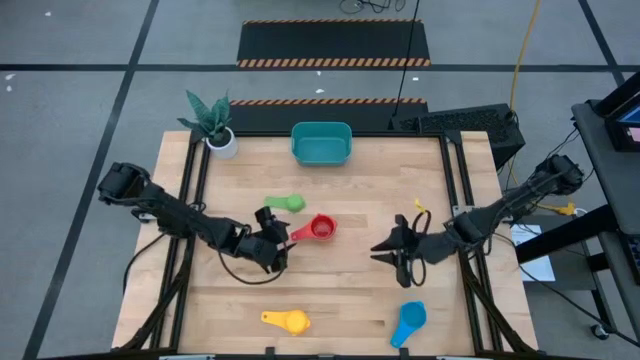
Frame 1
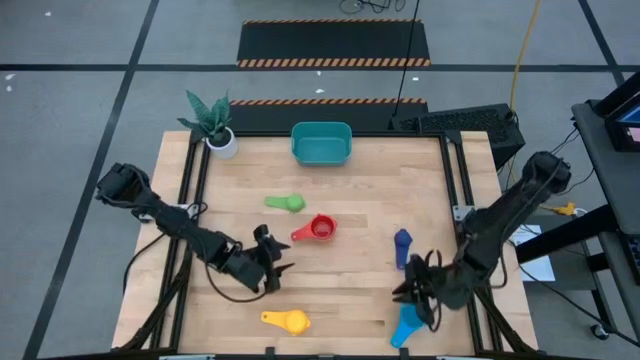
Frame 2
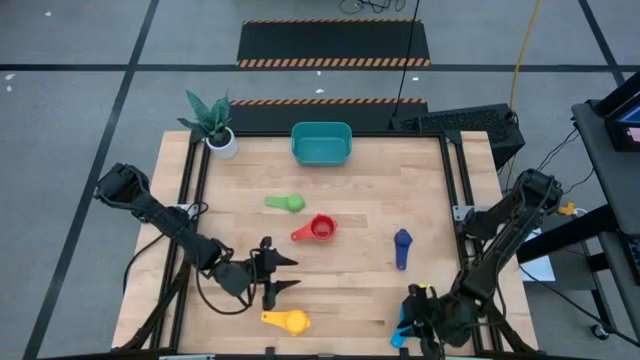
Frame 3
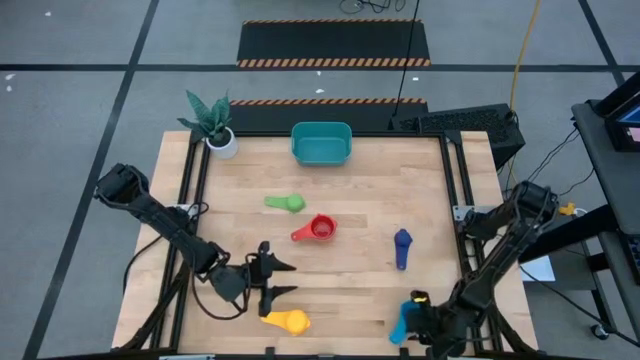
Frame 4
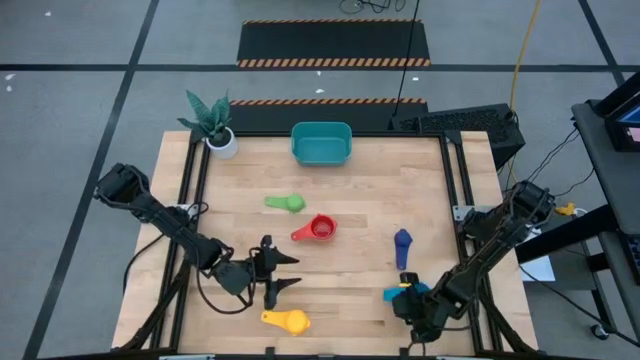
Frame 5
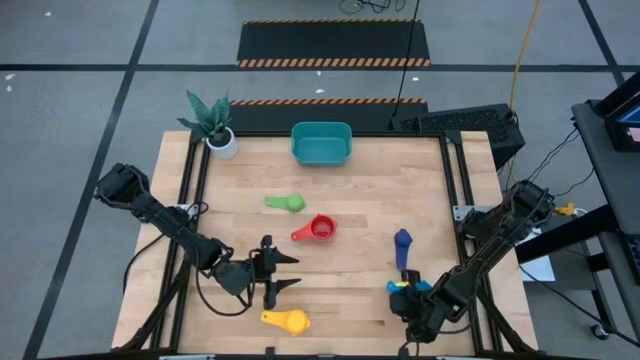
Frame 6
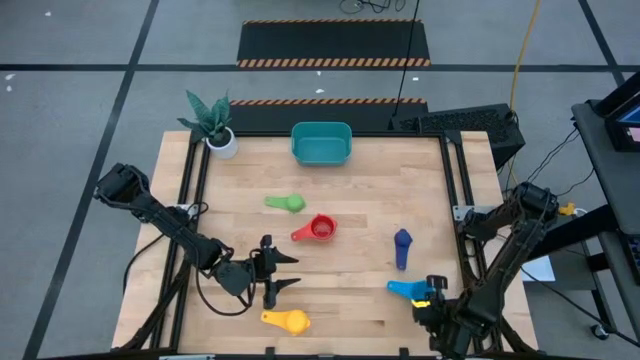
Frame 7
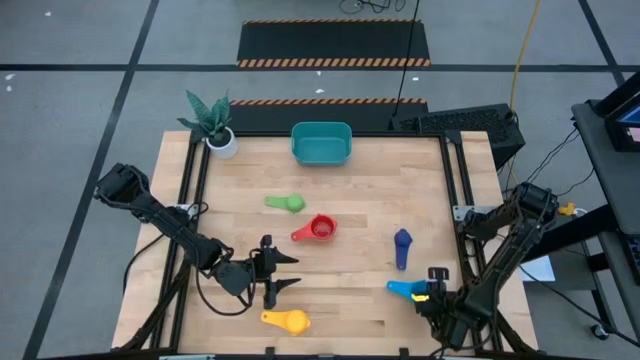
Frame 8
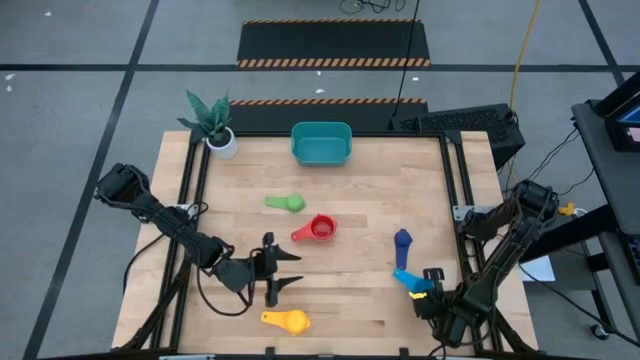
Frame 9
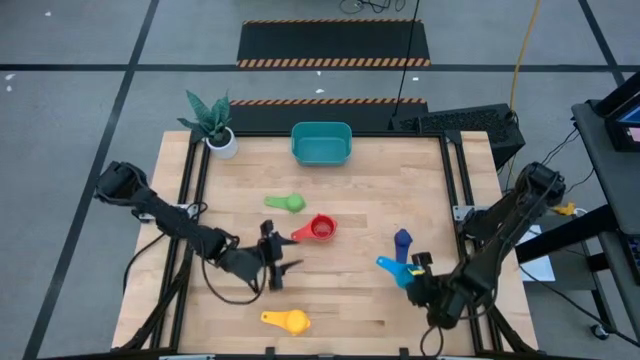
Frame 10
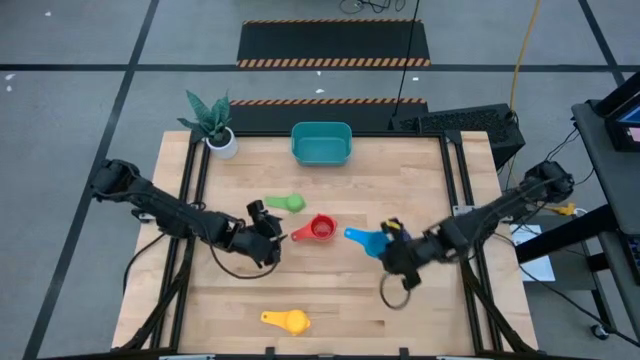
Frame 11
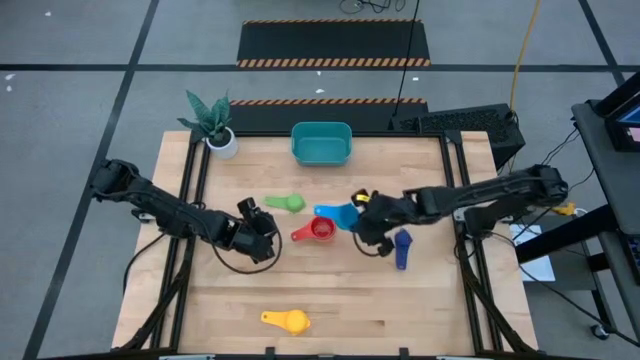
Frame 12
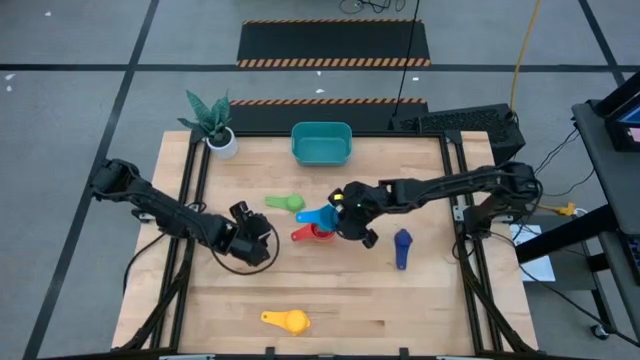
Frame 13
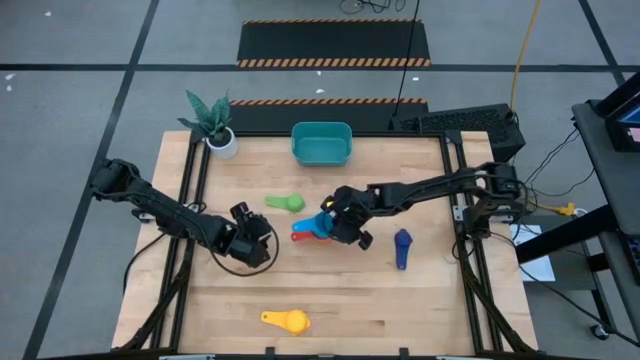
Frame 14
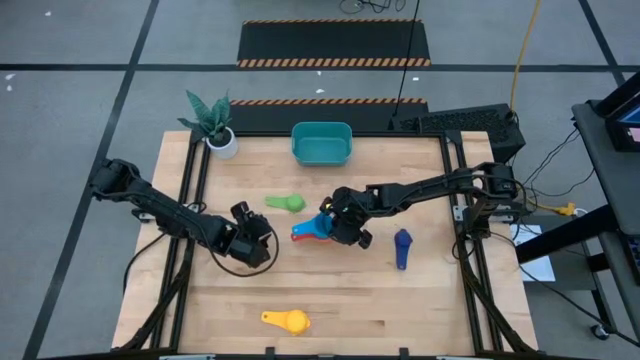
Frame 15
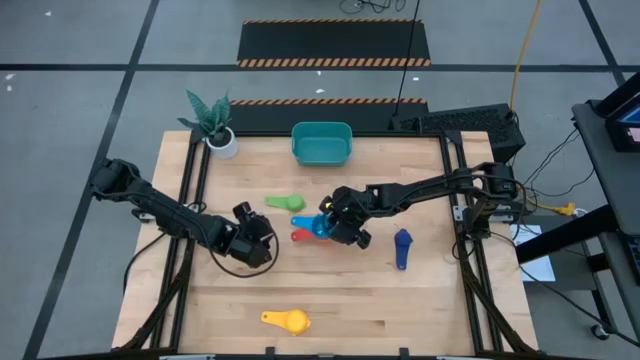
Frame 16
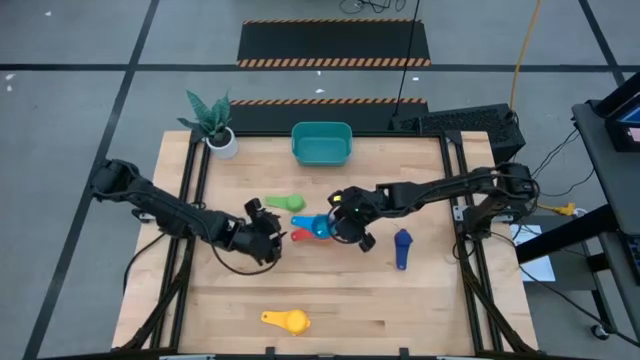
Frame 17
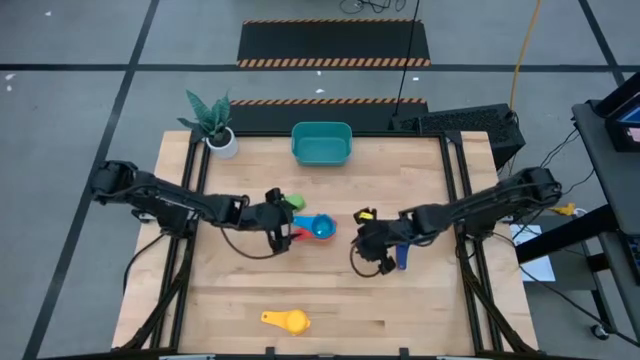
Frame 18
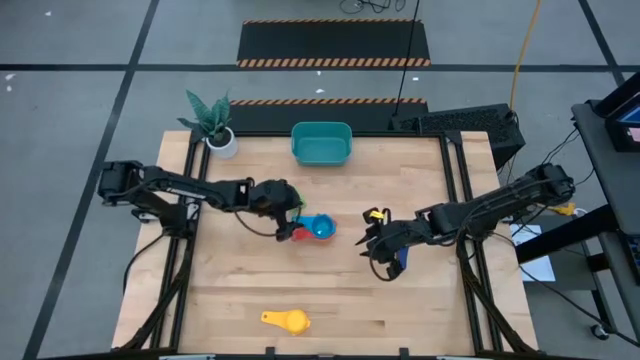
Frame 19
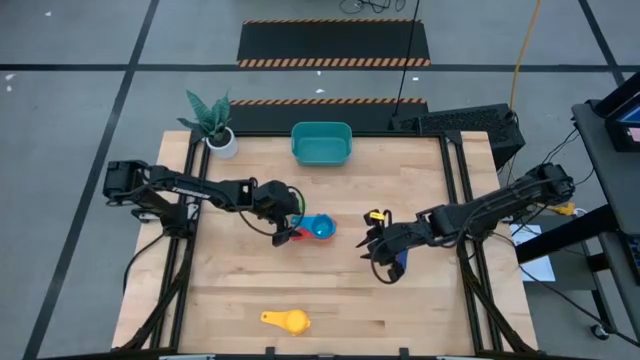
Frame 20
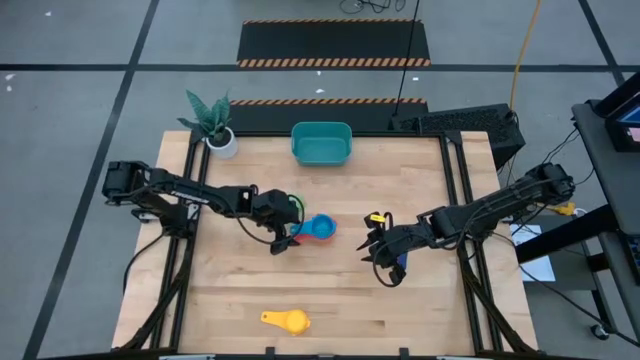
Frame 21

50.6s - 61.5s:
Task: Nest measuring cups in basket
Stack the light blue measuring cup on top of the red measuring cup

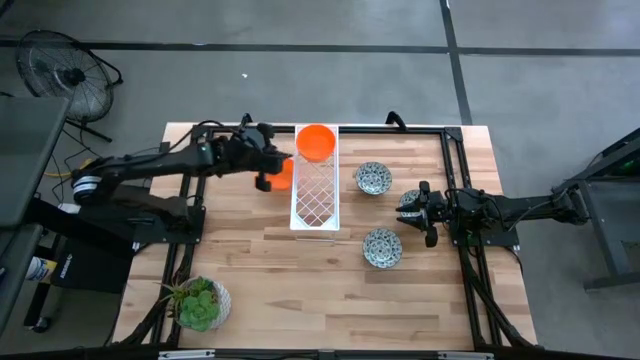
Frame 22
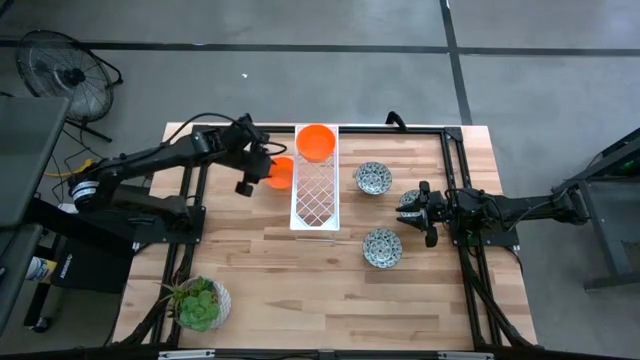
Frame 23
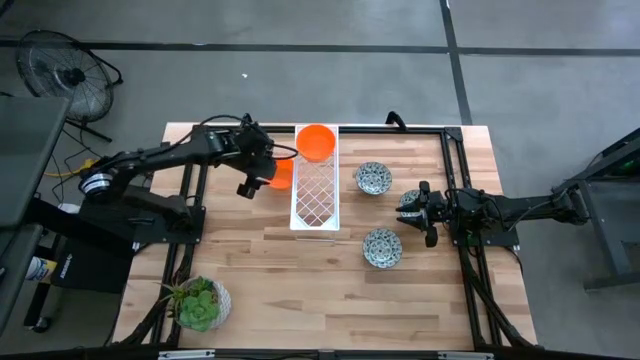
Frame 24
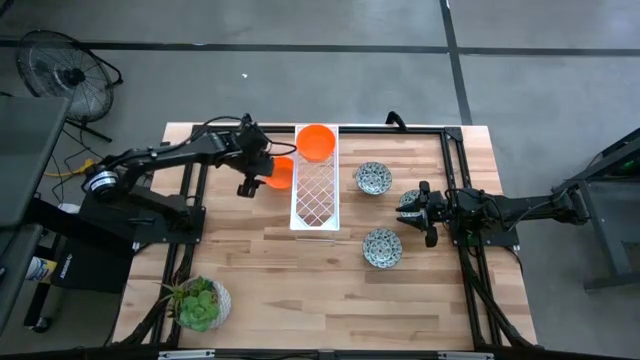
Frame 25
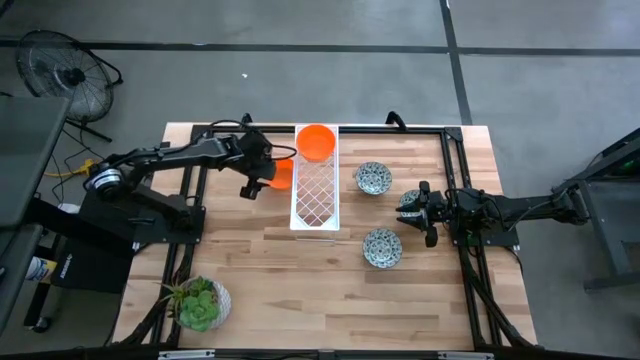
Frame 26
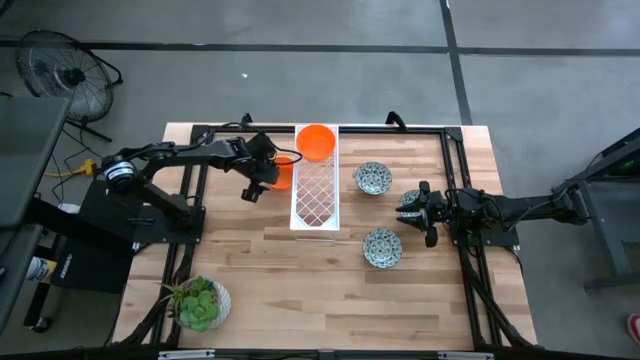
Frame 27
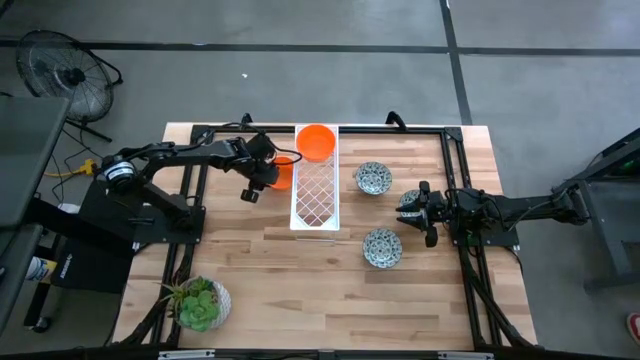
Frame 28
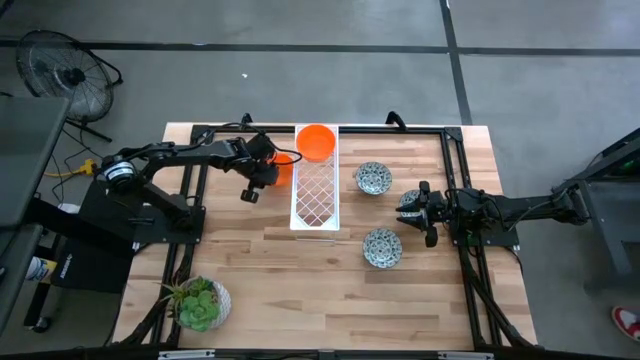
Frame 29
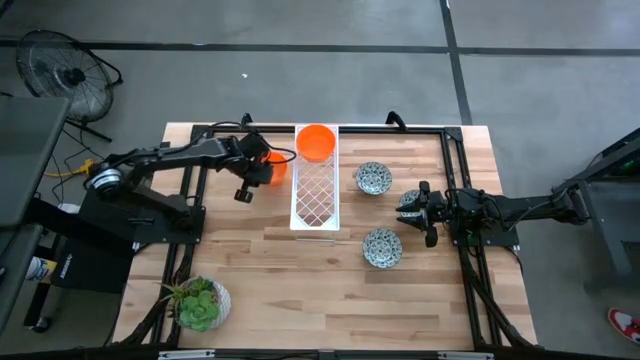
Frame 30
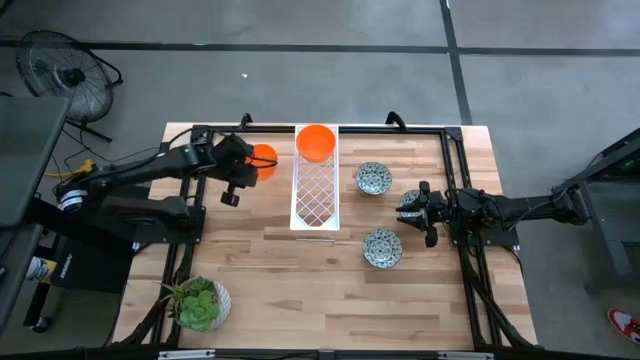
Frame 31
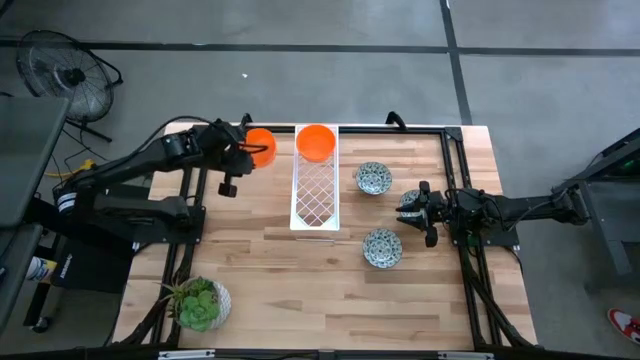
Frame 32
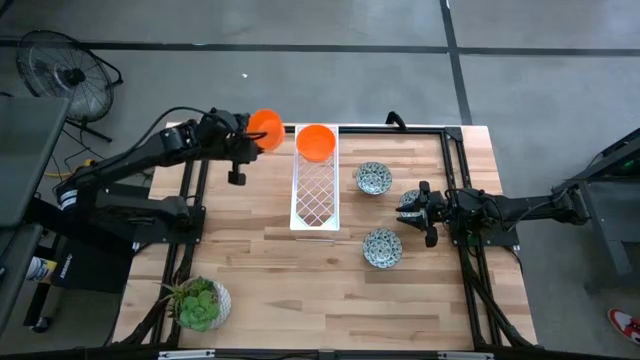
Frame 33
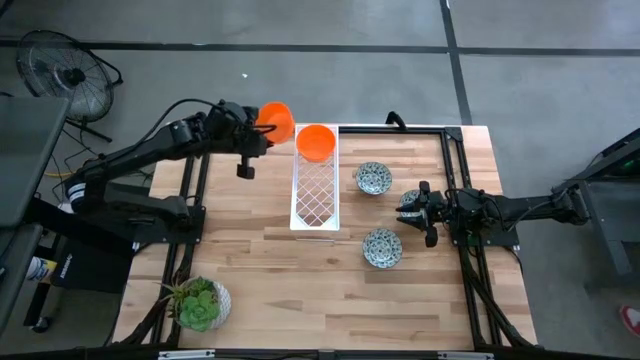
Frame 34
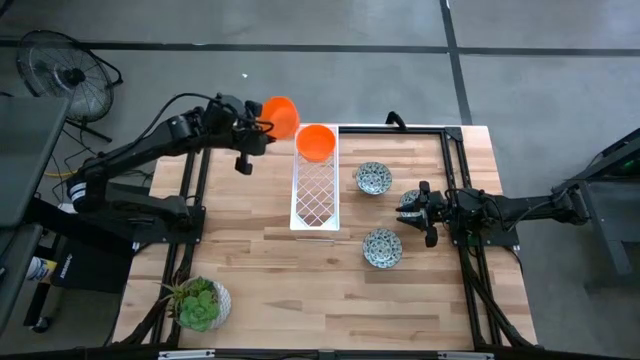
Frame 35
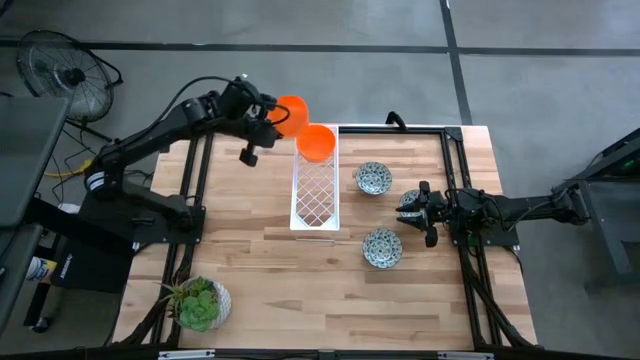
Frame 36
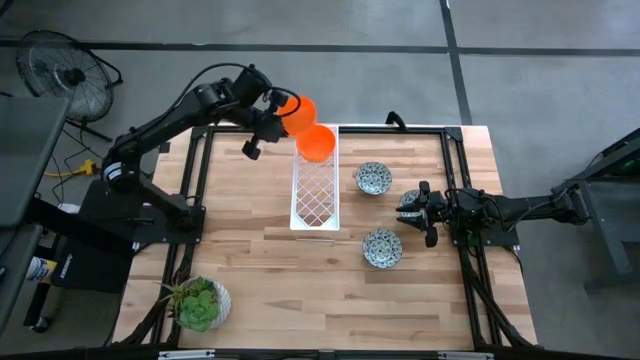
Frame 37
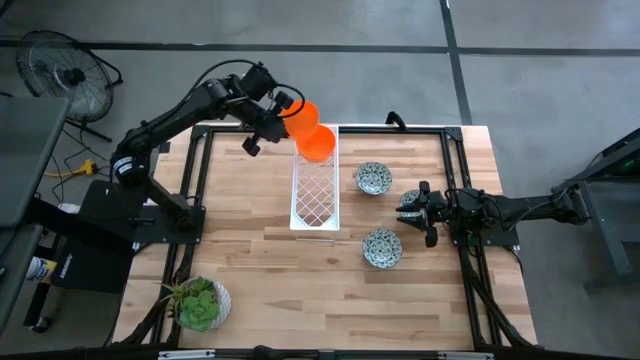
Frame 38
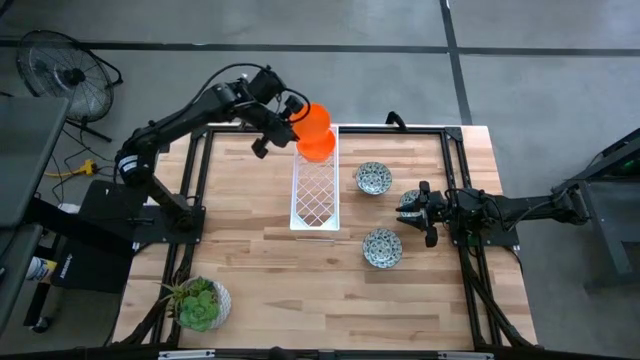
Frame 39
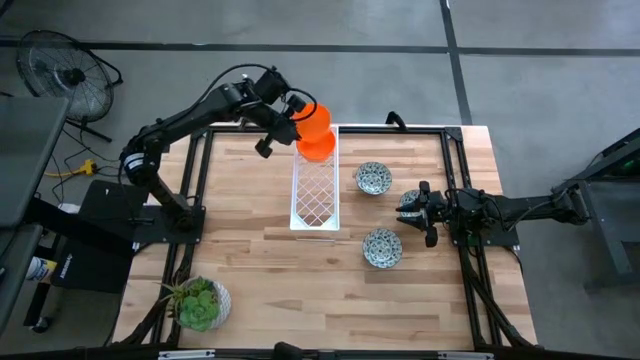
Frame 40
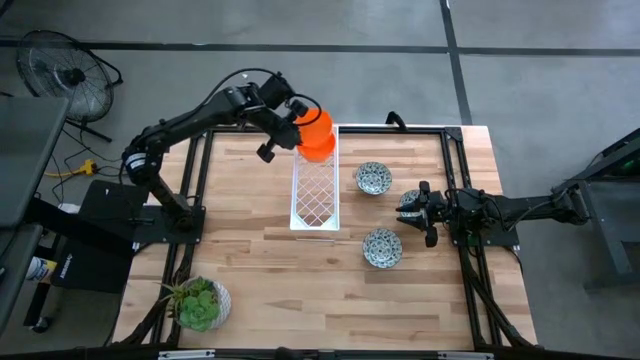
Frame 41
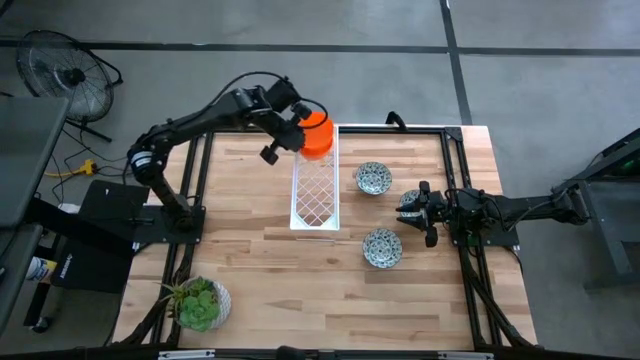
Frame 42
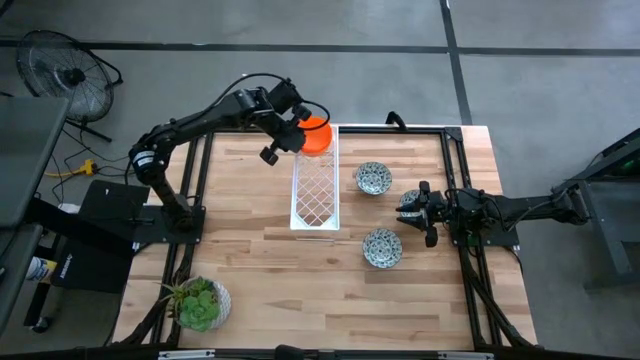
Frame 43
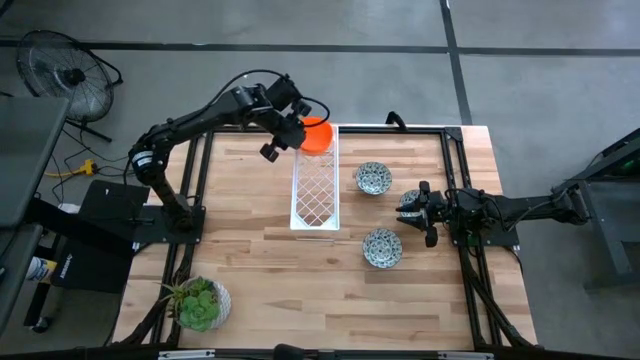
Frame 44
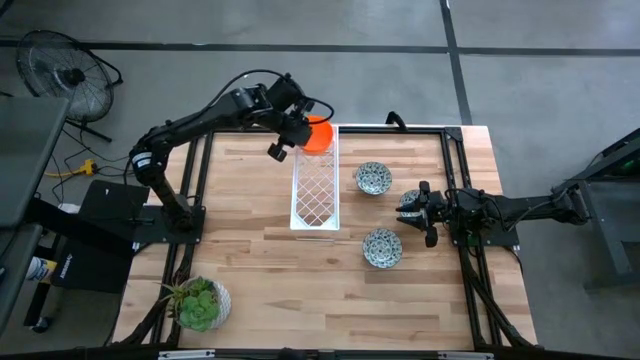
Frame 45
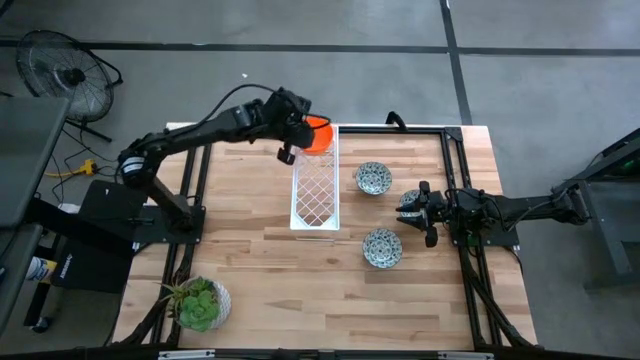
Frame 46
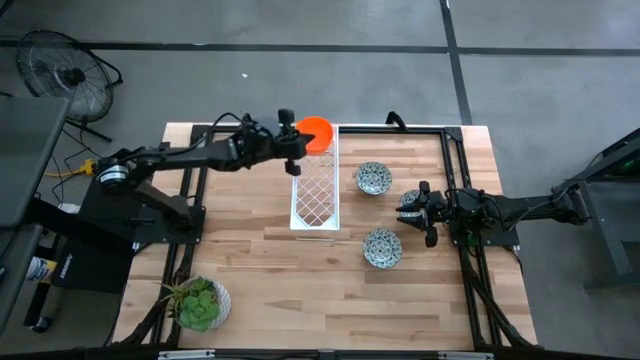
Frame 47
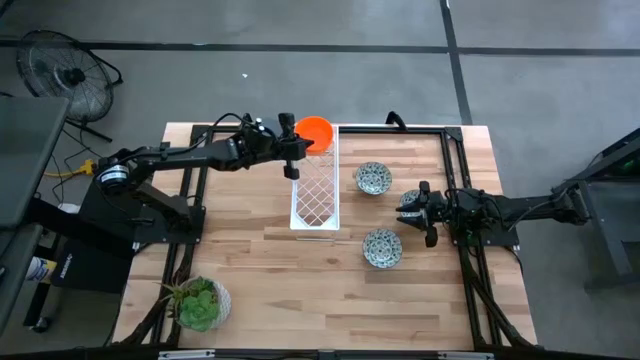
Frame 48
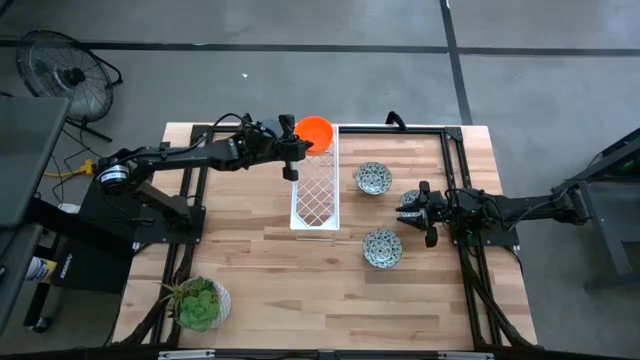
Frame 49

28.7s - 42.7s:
Task: Pick & Place Mini bowls
Stack the orange bowl on top of the other orange bowls on the shelf
